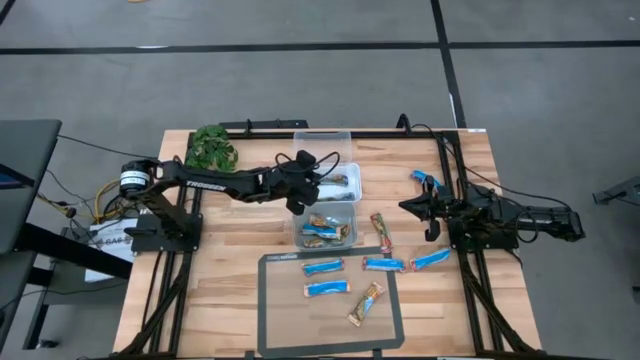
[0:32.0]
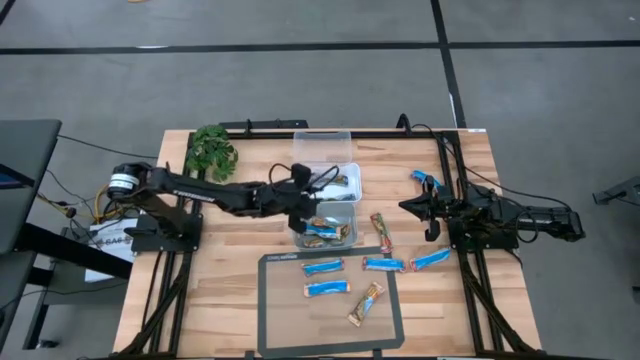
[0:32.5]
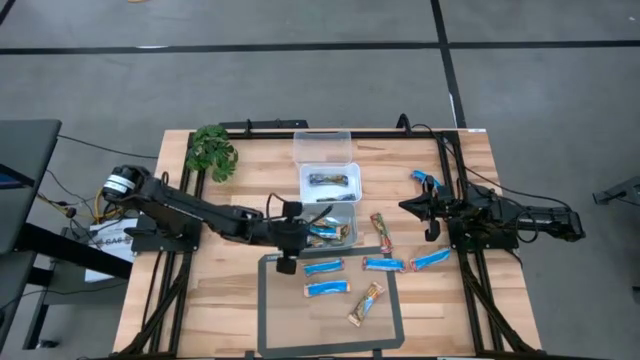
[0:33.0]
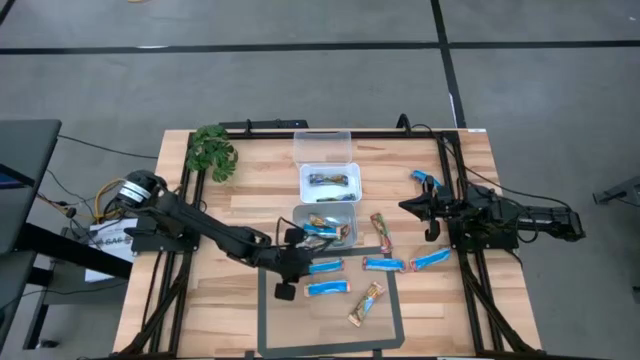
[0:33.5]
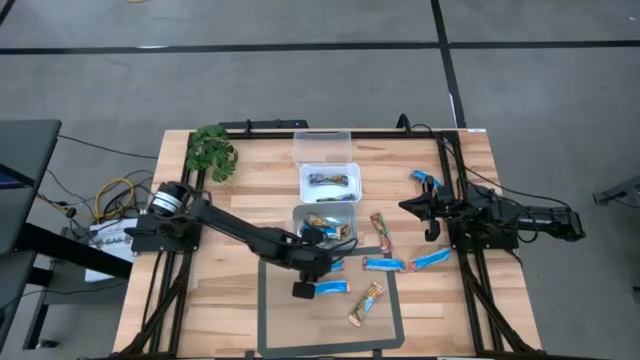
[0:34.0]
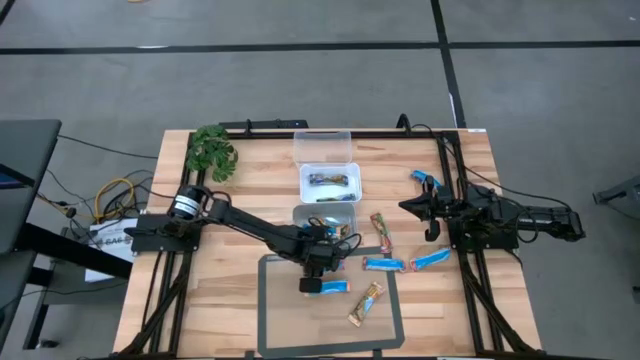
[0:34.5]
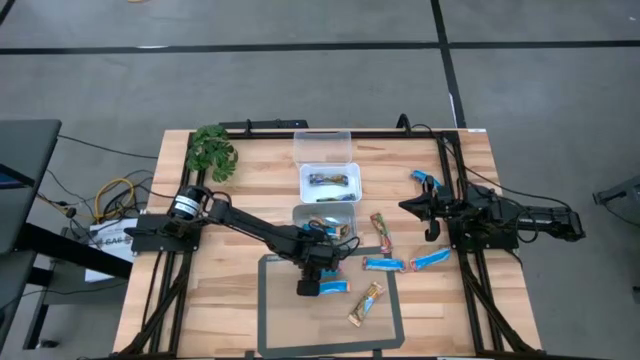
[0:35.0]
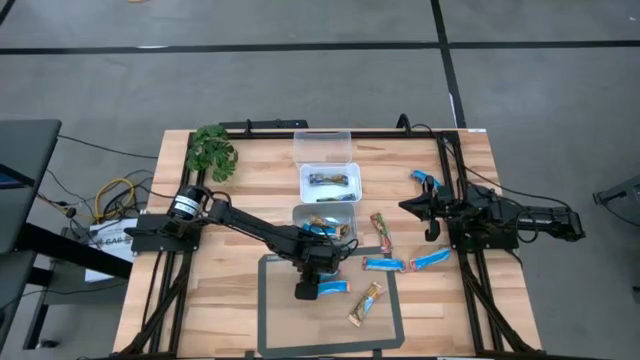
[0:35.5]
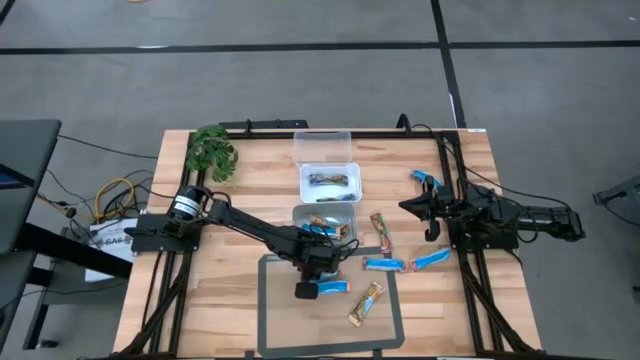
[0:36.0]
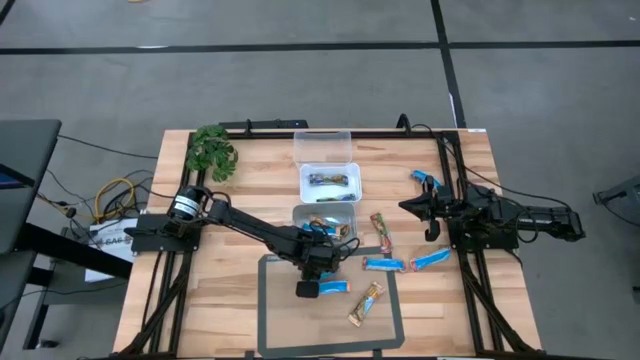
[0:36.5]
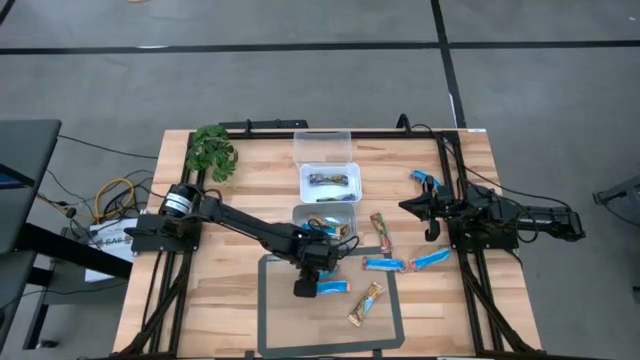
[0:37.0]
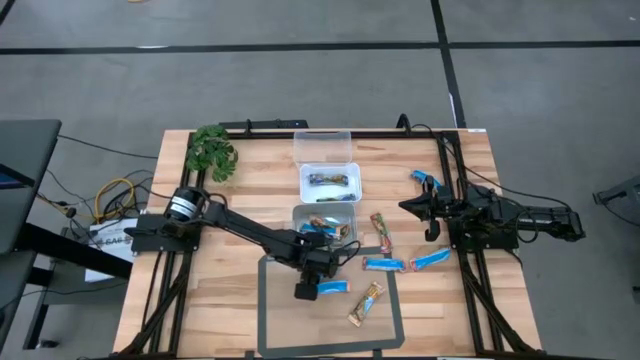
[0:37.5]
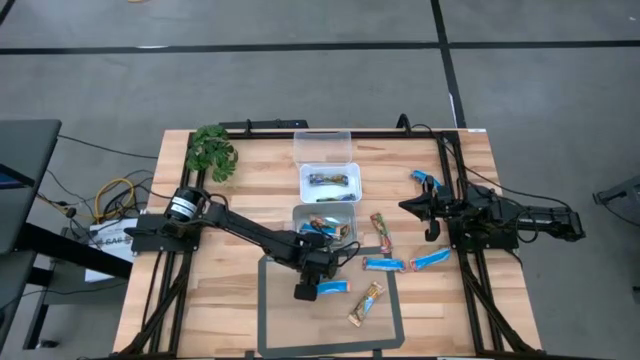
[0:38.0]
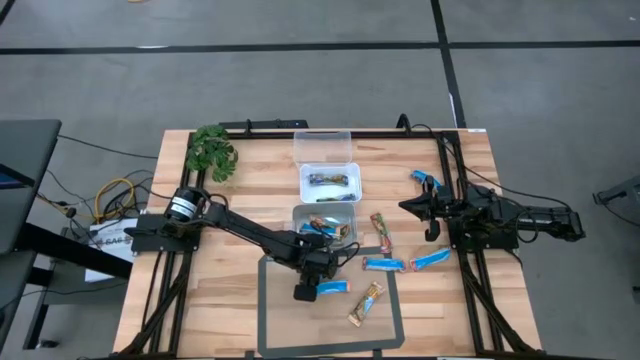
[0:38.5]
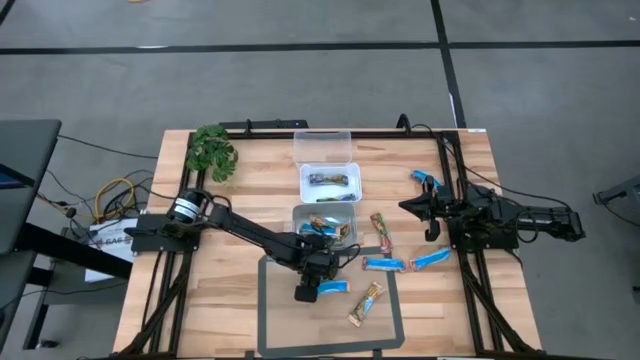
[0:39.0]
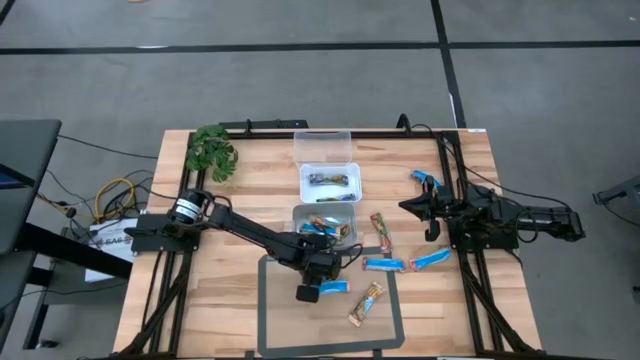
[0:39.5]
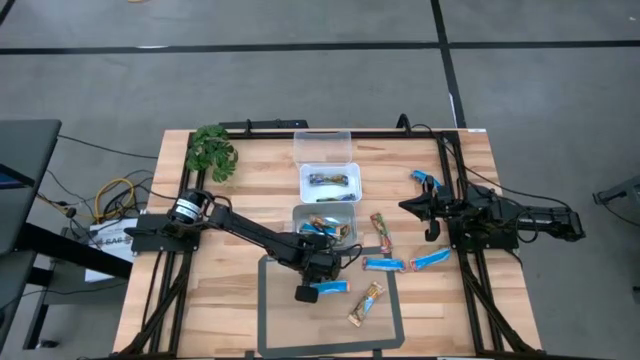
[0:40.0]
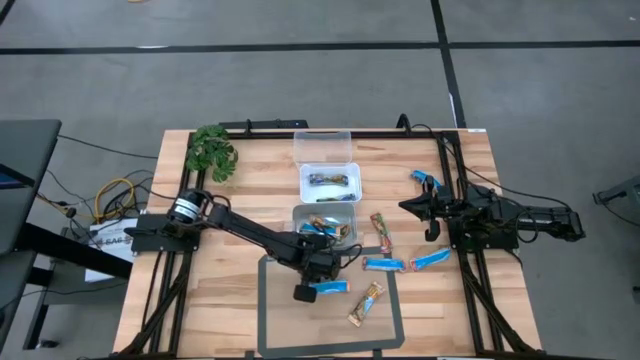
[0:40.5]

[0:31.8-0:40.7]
Task: Pick and place Granola Bars by type
Put the red granola bar into the transparent bin

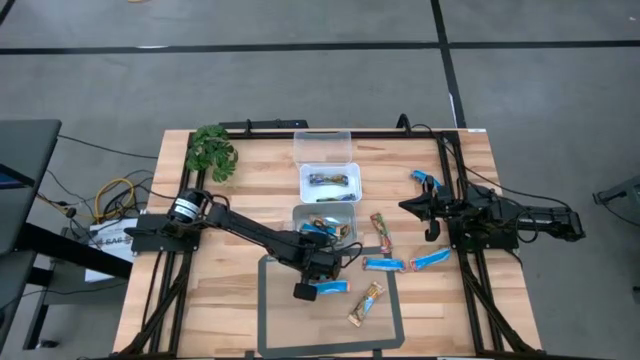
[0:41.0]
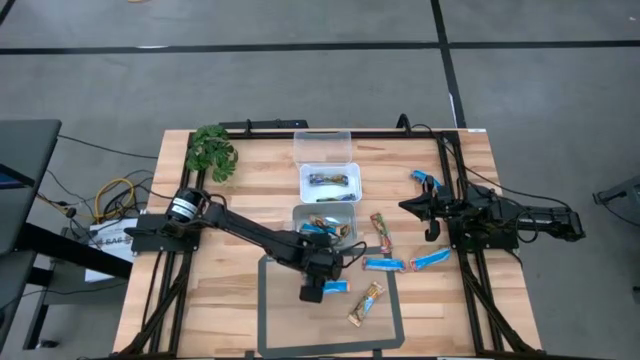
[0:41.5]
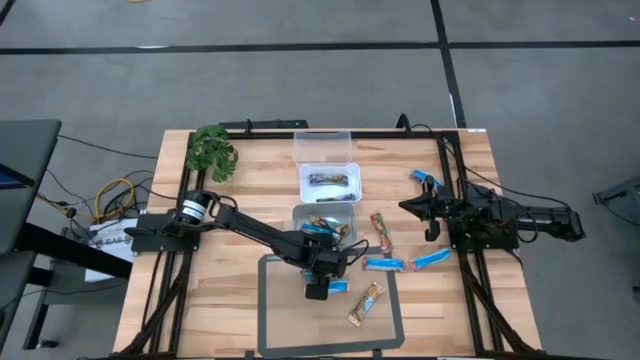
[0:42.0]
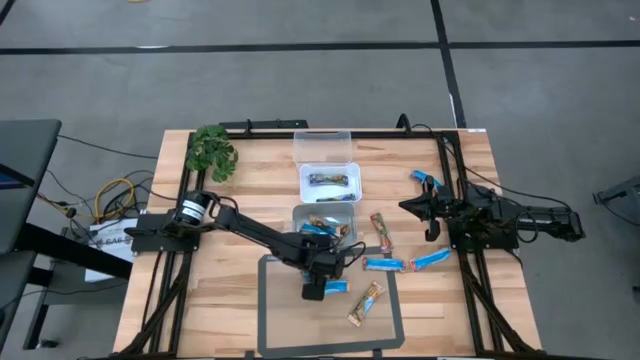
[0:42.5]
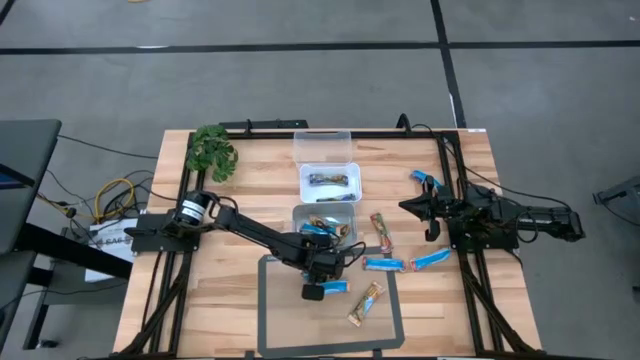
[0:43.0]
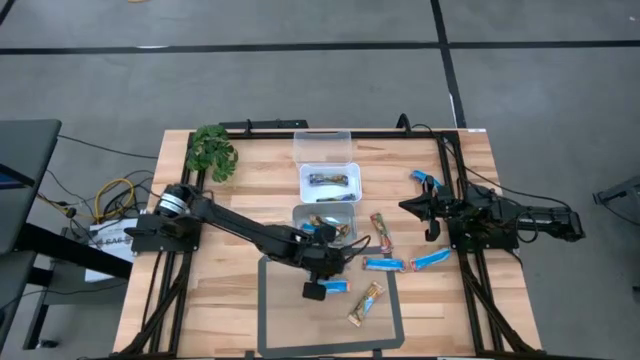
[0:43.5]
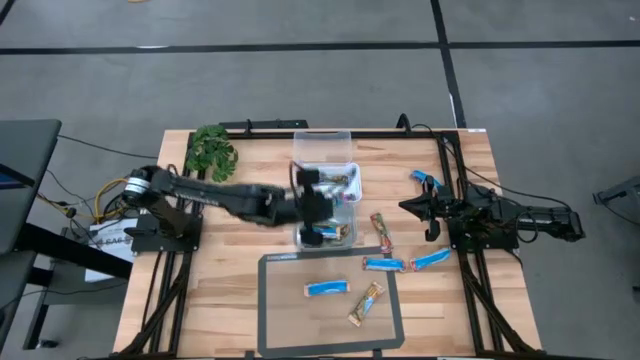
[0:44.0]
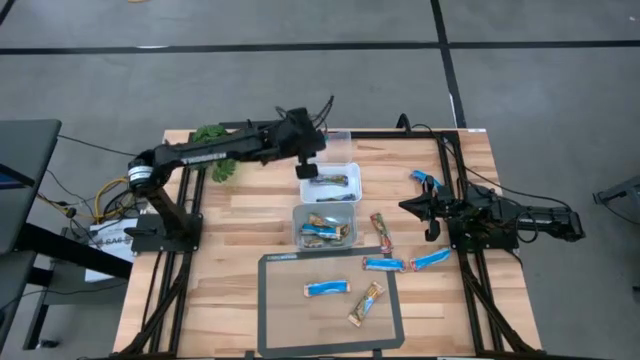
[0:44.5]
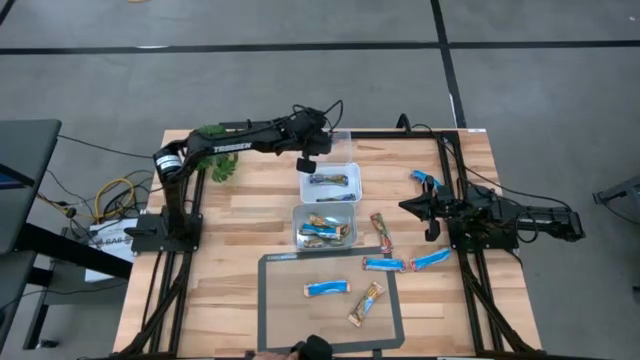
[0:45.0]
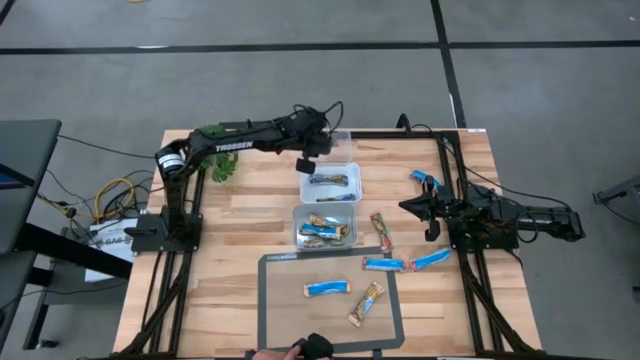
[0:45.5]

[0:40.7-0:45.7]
Put the red granola bar into the transparent bin

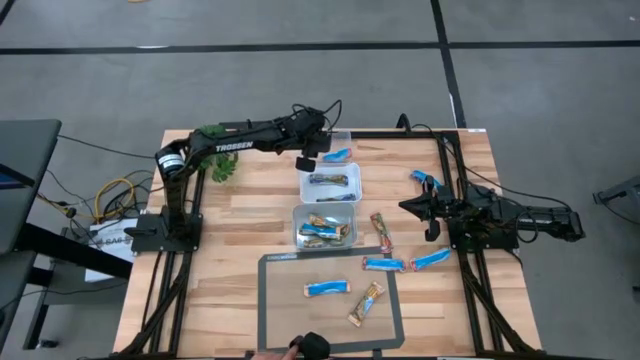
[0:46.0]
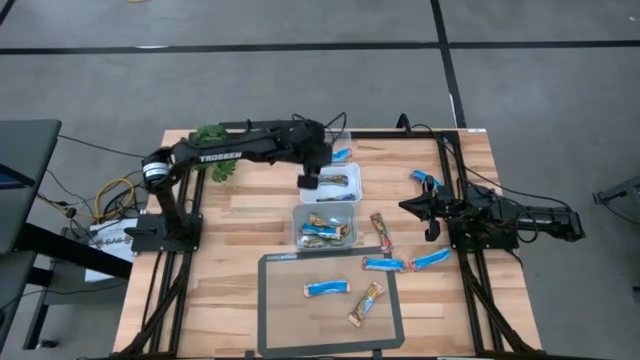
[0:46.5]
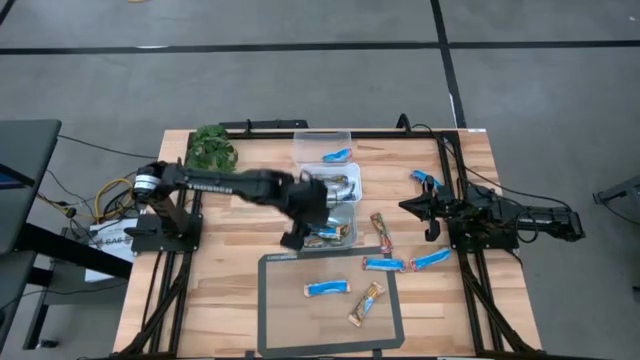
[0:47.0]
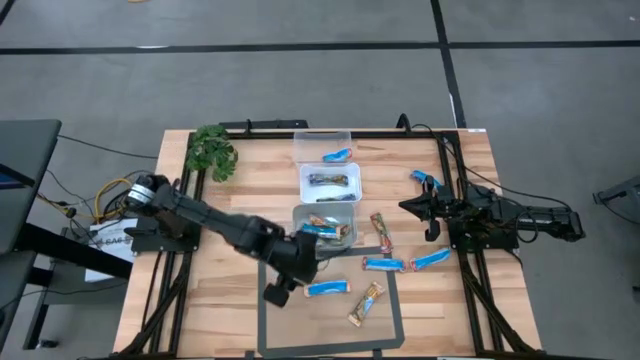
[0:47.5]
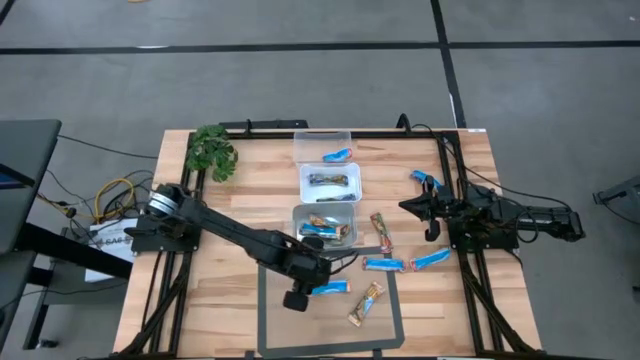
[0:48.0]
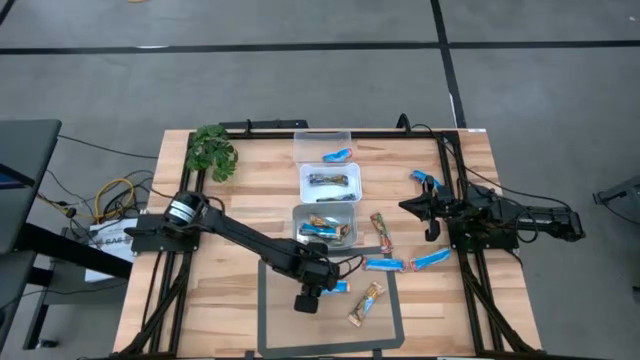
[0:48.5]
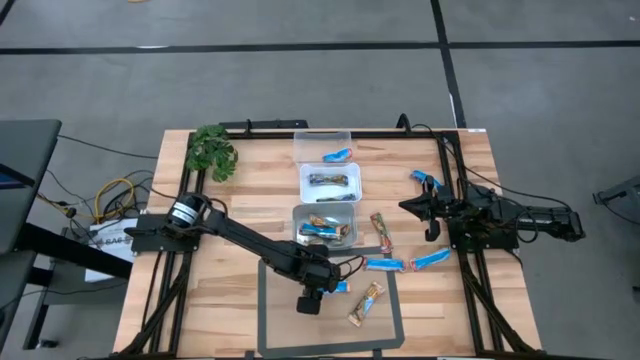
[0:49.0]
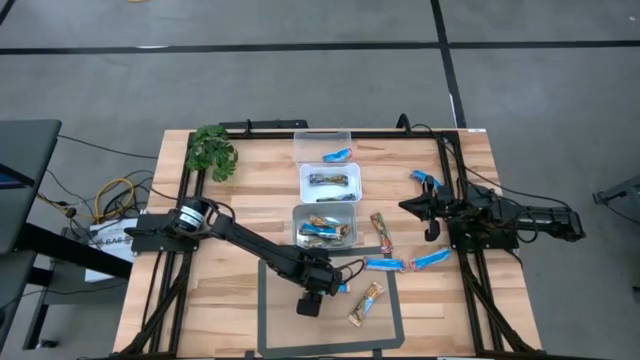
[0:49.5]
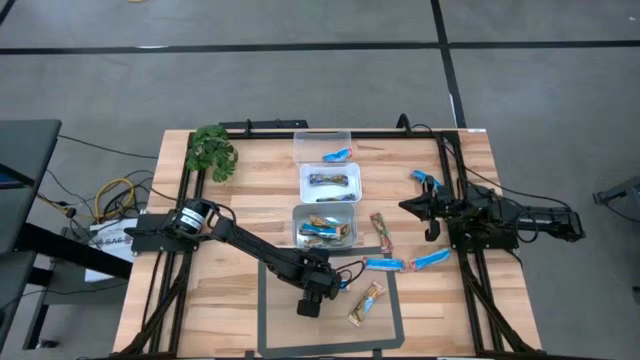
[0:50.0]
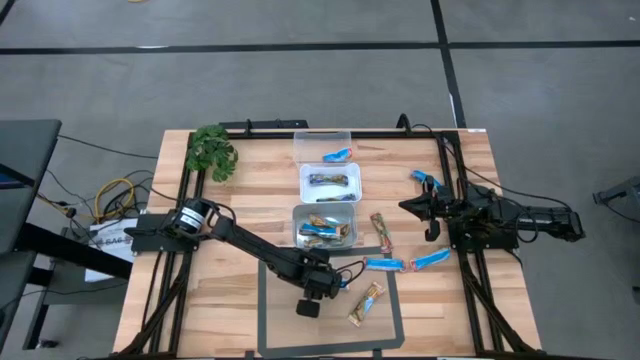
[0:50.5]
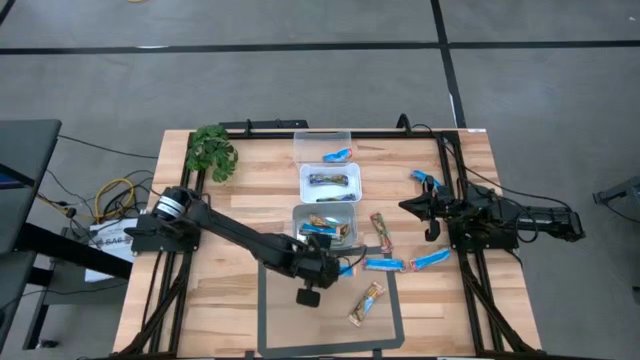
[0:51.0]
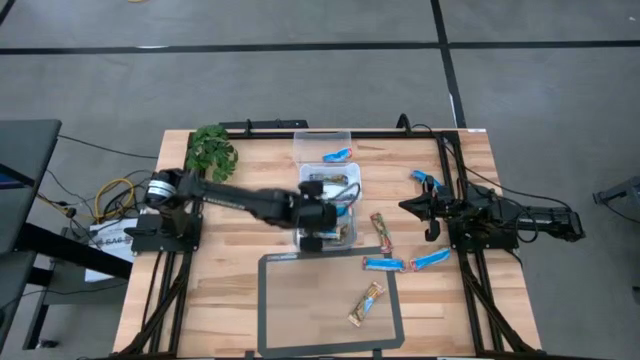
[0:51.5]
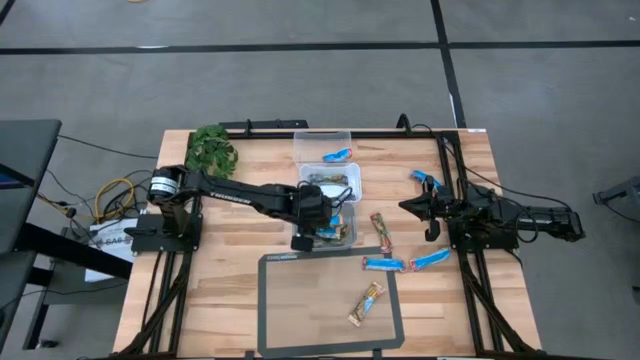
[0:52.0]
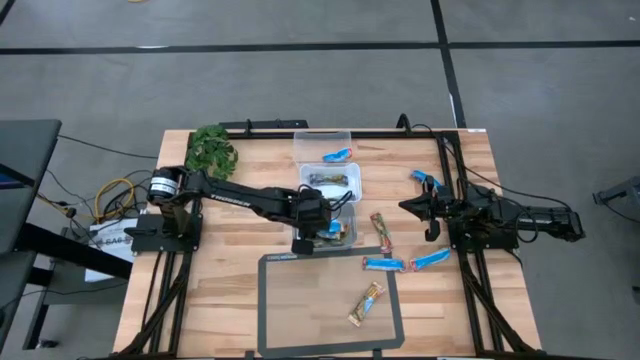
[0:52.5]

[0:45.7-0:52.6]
Put the yellow granola bar into the gray bin
